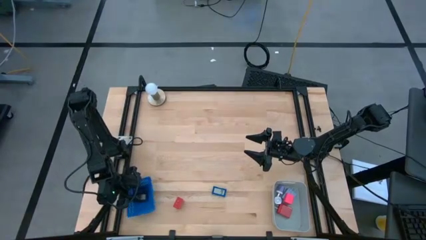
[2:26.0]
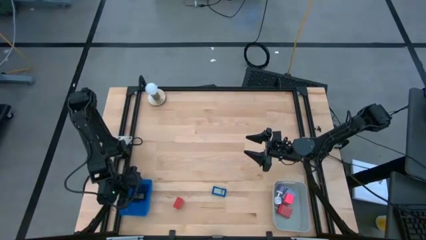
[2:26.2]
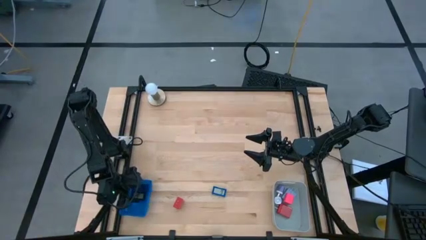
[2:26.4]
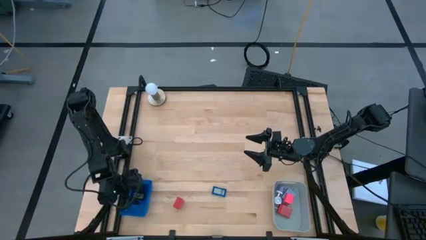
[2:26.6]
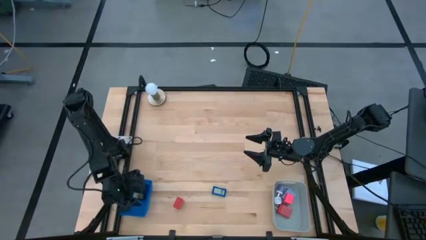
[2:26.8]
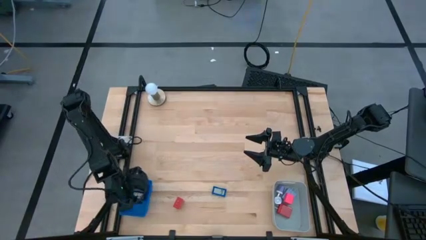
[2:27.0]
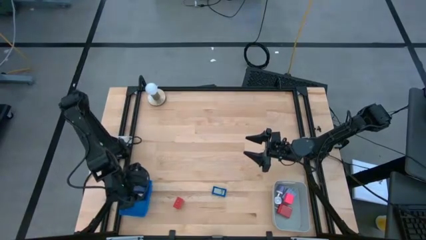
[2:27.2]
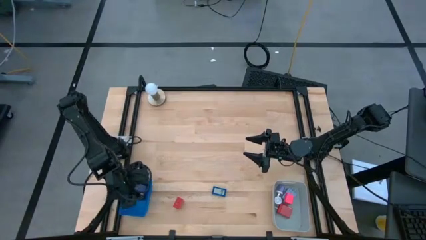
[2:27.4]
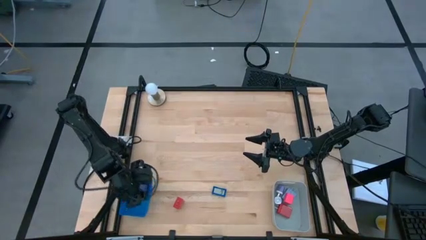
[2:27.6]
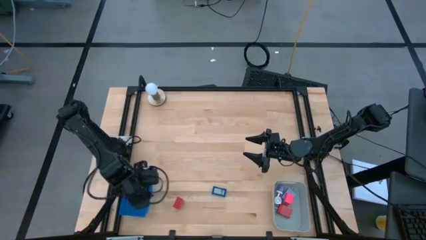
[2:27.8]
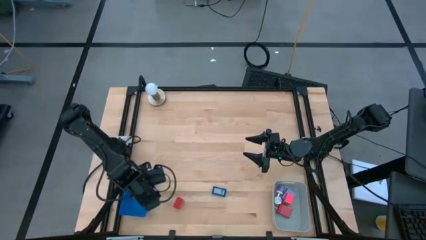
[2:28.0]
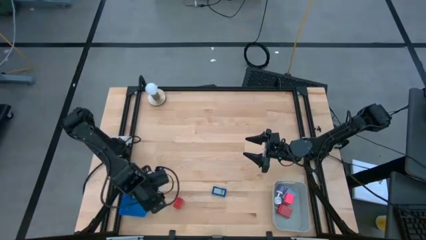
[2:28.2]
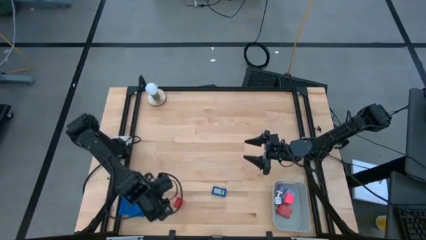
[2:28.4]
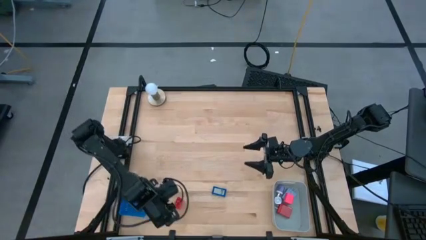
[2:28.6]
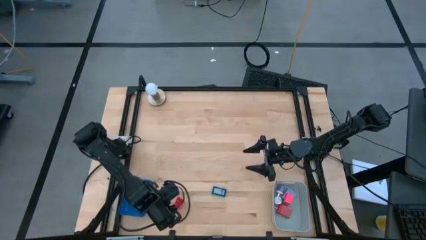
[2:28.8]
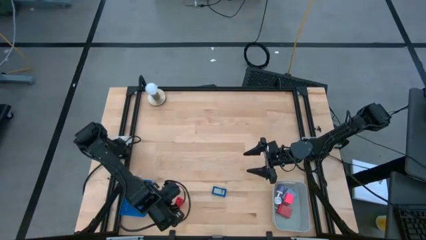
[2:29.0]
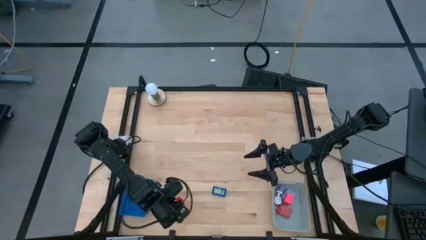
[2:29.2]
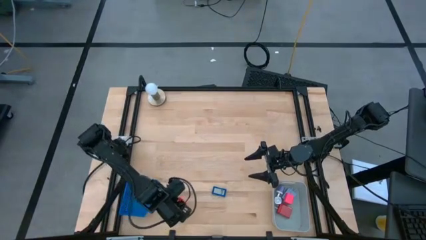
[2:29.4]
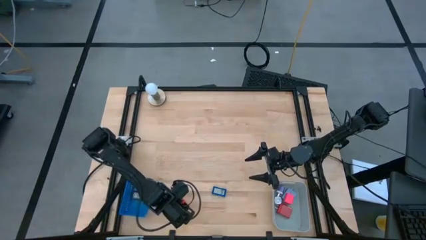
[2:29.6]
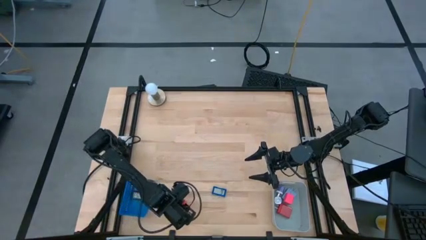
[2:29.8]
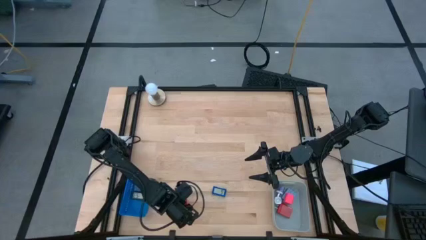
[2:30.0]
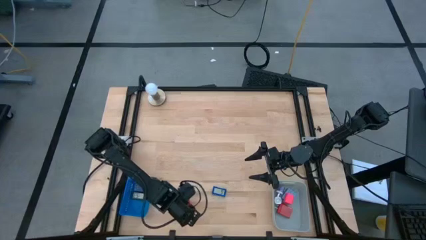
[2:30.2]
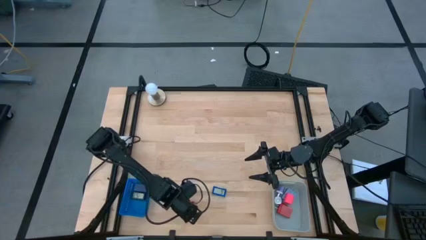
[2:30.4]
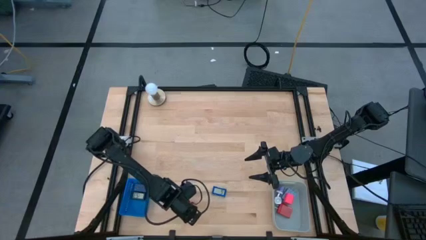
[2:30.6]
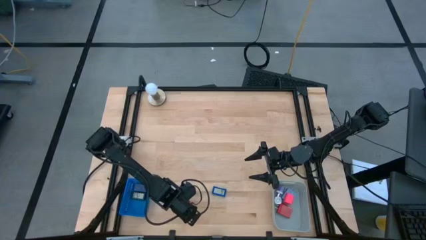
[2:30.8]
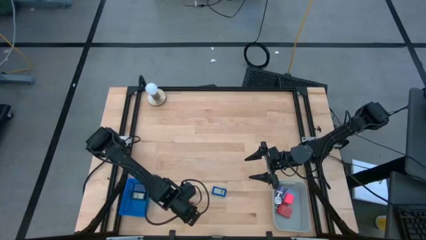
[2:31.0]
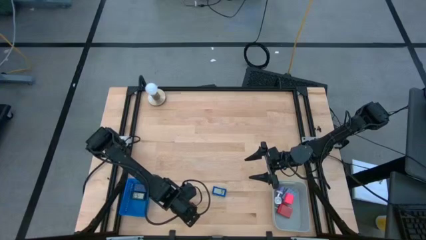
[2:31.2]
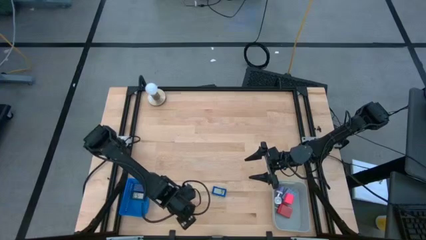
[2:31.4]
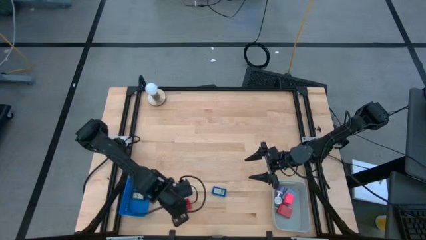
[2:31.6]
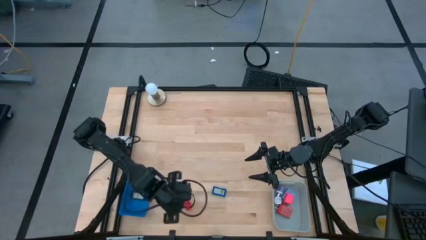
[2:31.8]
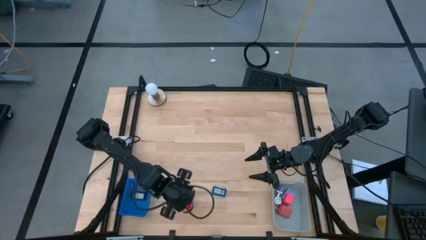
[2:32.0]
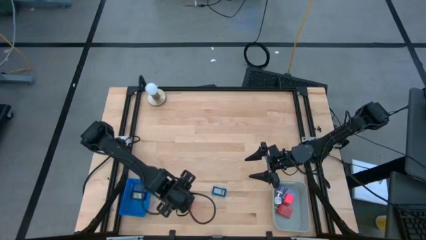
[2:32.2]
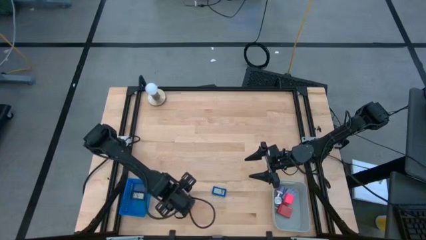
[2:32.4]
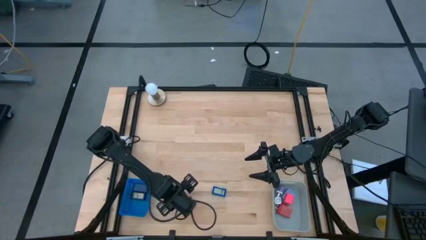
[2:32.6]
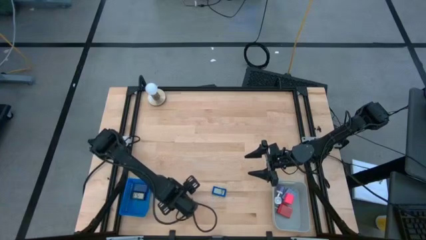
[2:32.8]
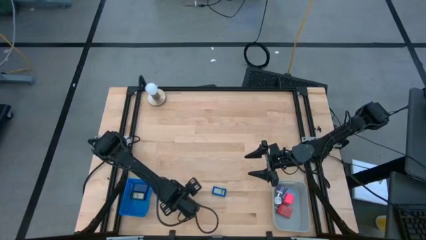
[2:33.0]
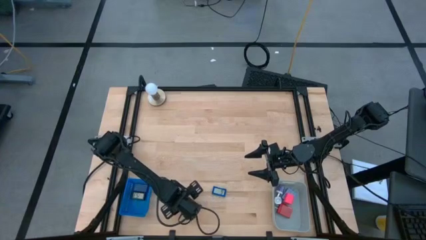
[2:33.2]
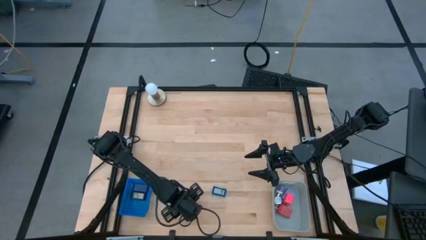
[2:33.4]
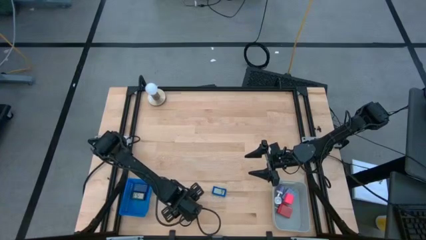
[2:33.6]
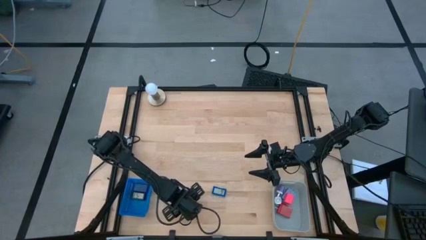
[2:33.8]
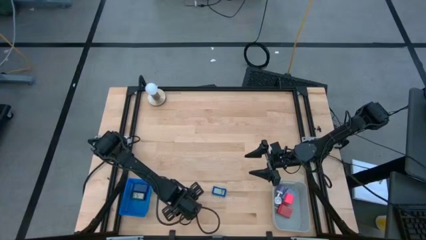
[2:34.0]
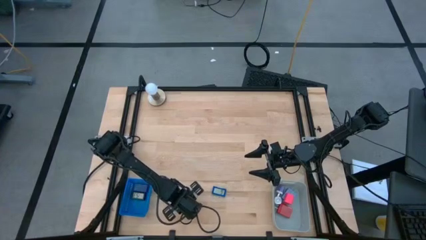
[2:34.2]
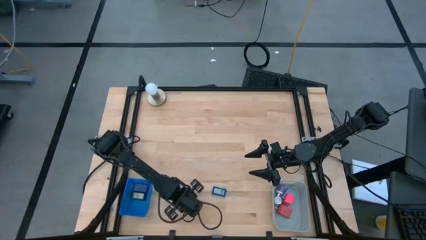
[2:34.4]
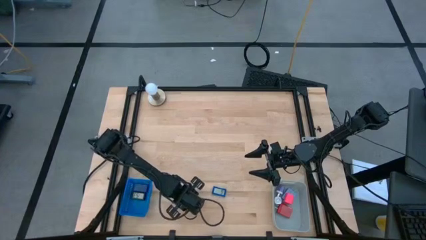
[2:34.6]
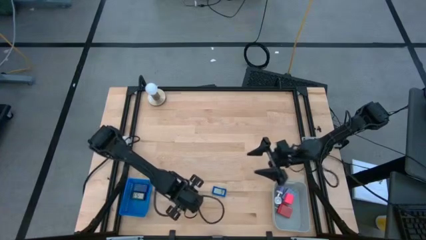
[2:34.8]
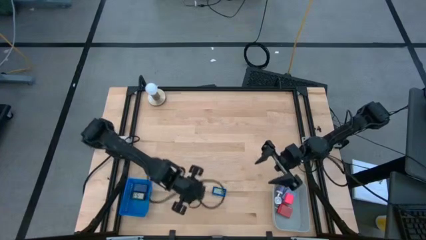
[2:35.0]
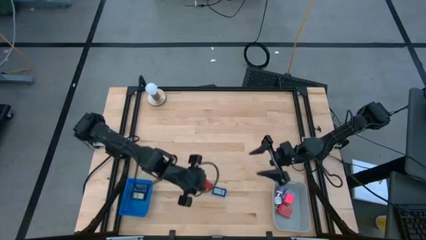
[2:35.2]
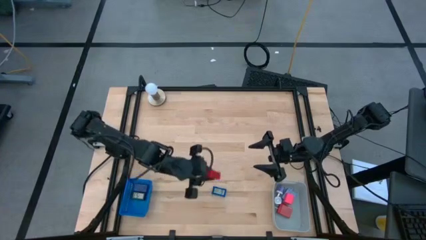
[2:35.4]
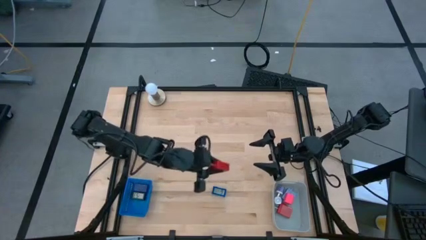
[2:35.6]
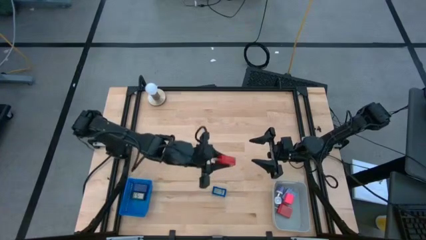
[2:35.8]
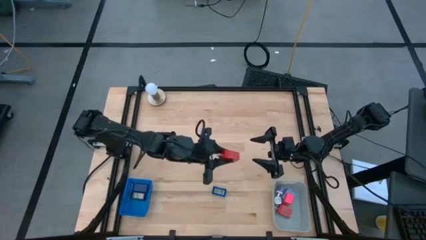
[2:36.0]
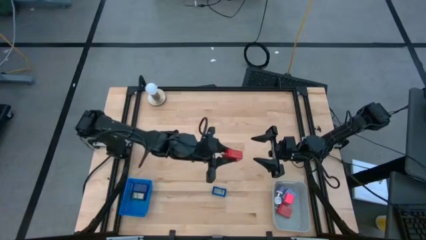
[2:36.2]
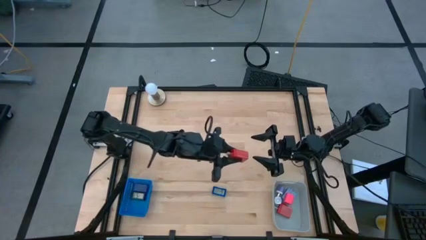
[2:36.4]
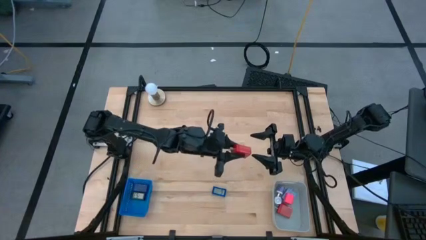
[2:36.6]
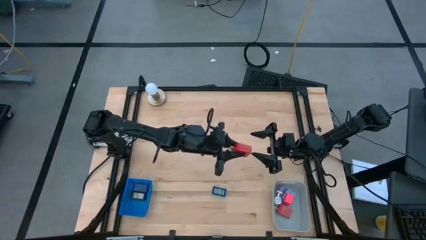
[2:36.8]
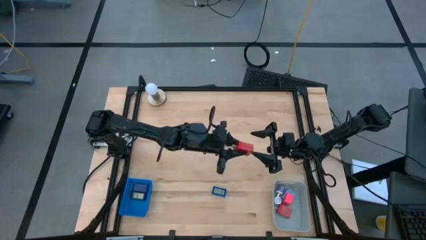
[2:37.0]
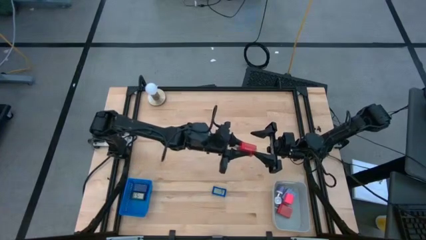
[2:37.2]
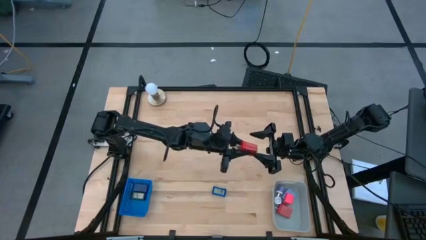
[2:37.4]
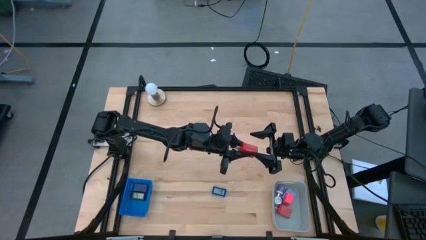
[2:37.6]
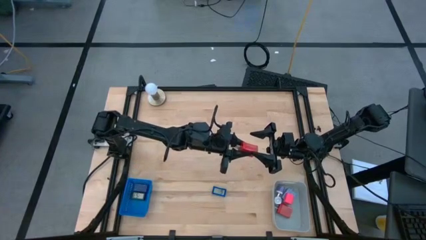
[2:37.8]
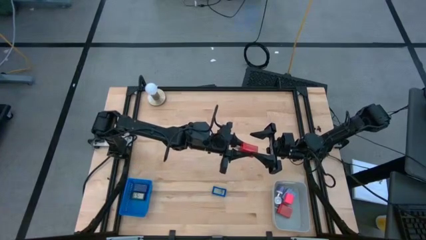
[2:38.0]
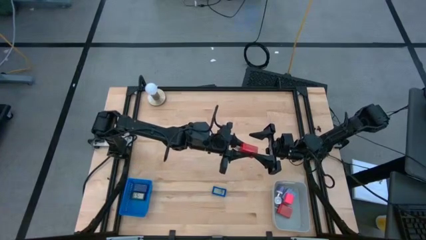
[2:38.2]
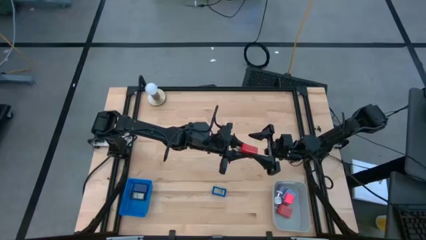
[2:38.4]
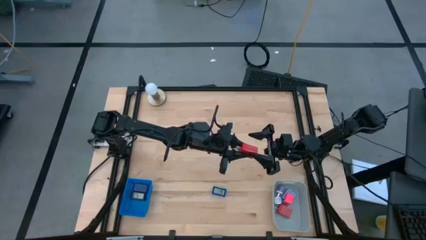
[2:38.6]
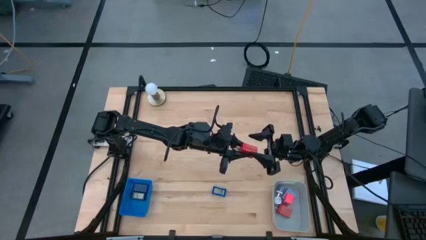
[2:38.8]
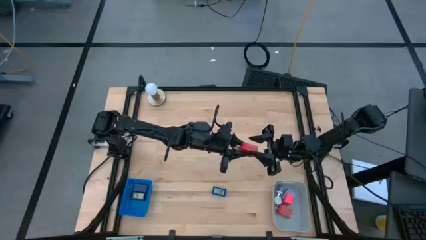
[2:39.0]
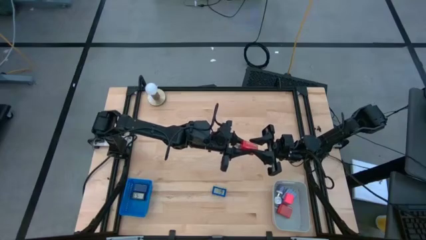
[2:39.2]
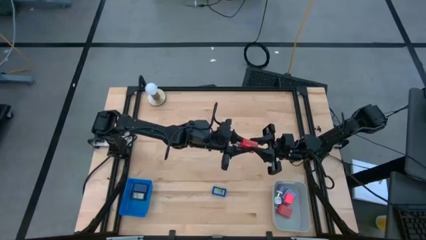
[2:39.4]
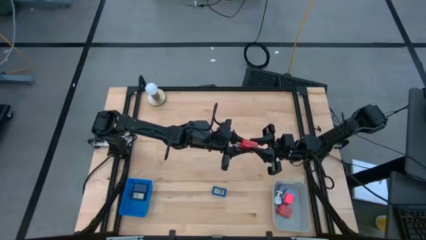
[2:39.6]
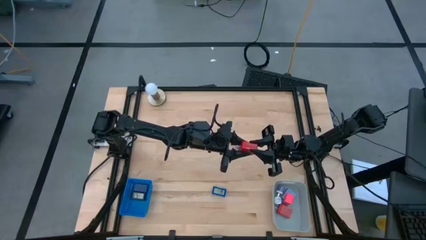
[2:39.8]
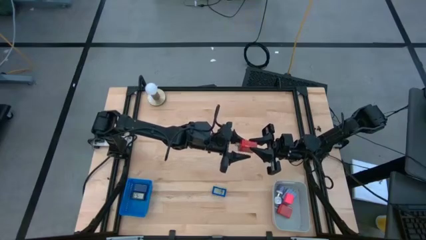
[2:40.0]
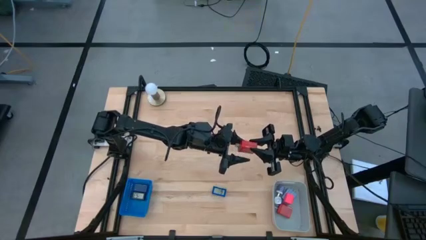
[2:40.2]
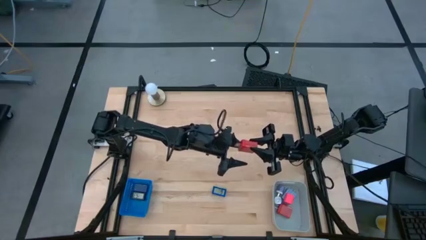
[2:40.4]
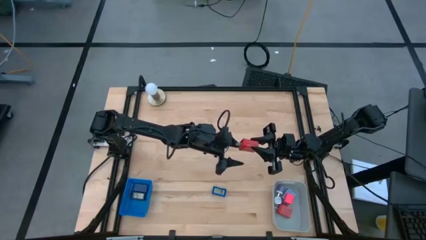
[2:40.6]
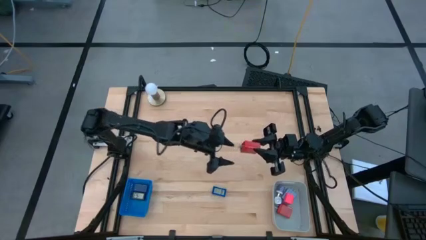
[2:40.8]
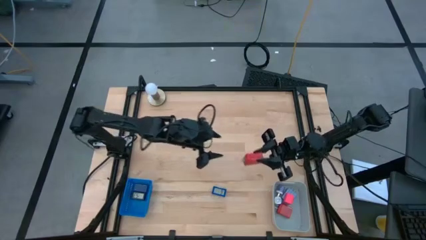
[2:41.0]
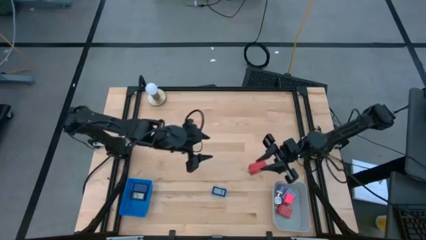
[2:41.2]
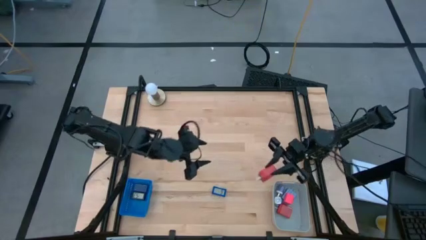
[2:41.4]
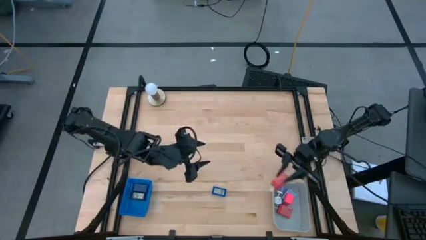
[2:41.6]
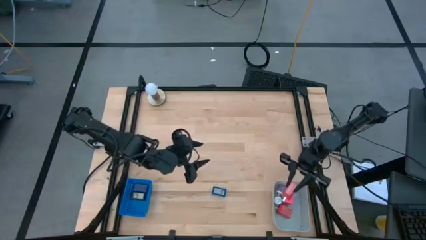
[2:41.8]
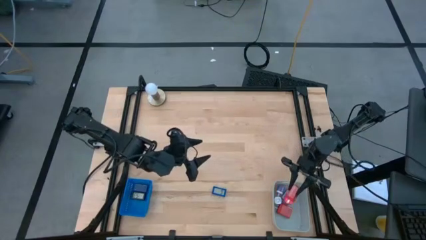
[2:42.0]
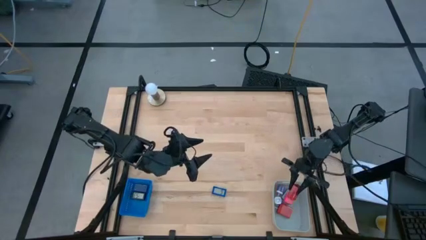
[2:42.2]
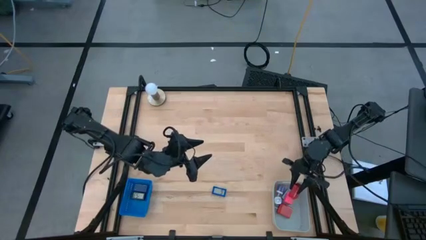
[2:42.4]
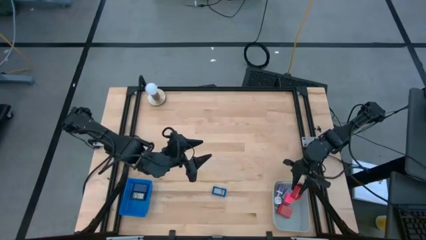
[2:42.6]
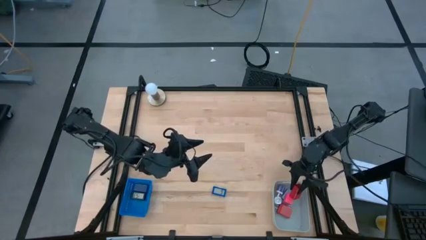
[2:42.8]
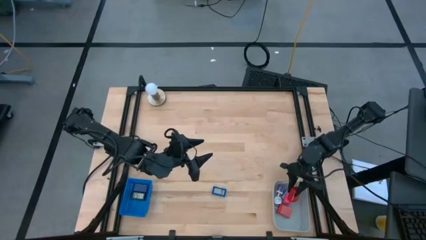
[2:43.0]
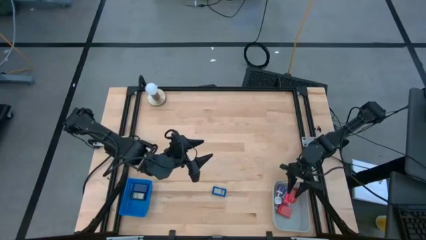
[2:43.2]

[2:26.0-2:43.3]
Task: Pick & Place Office items
Put the red charger adapter into the gray bin
